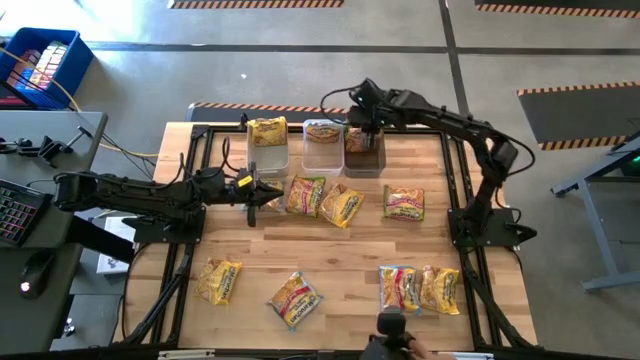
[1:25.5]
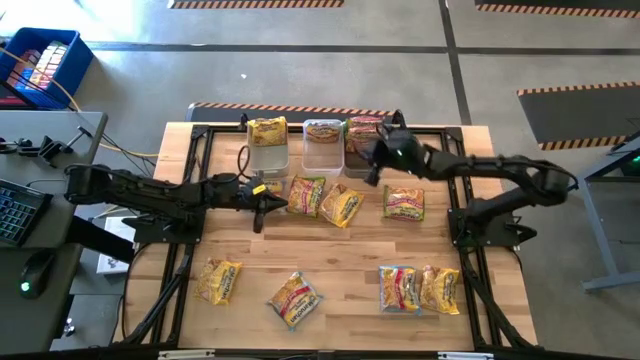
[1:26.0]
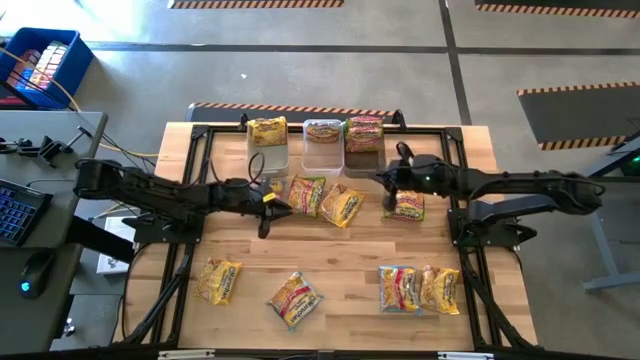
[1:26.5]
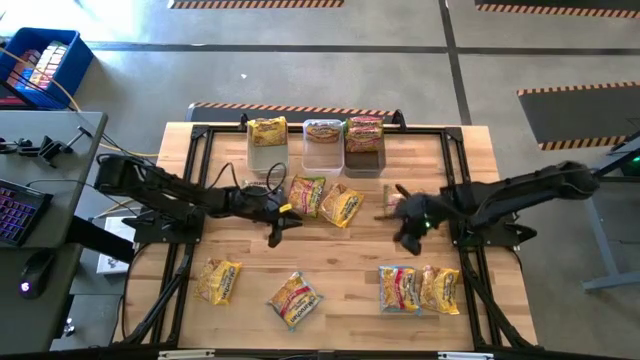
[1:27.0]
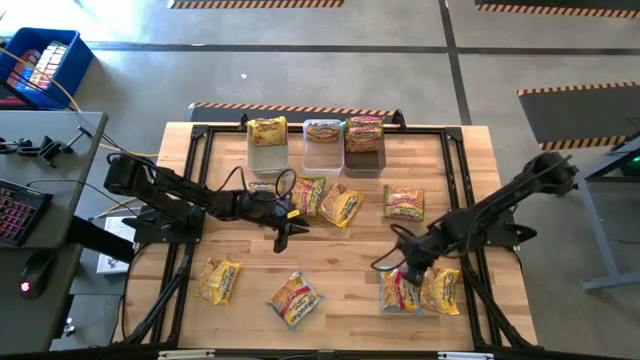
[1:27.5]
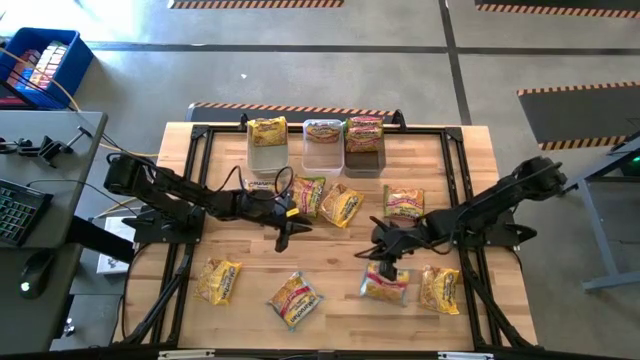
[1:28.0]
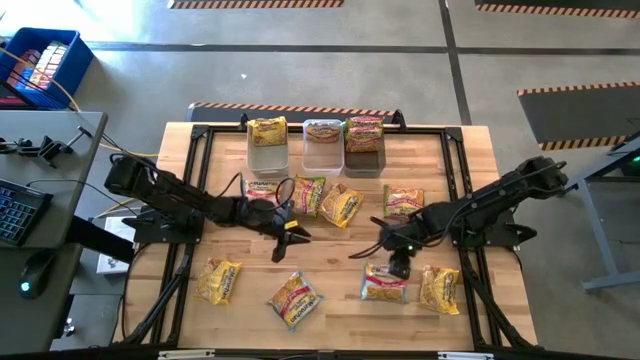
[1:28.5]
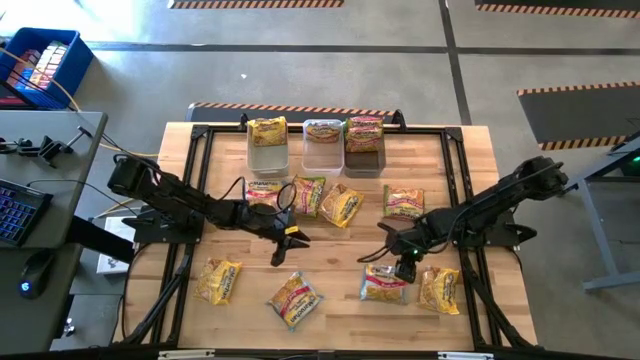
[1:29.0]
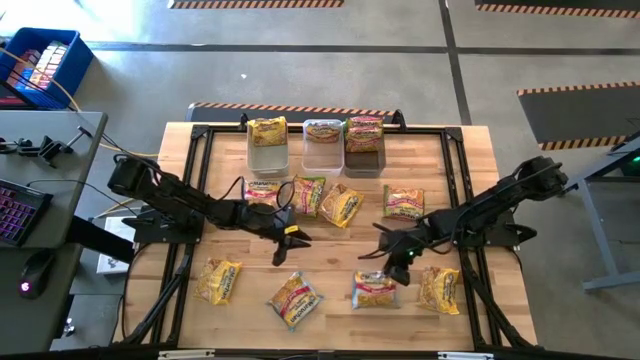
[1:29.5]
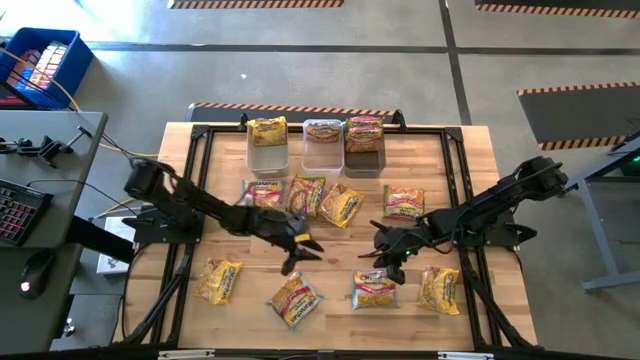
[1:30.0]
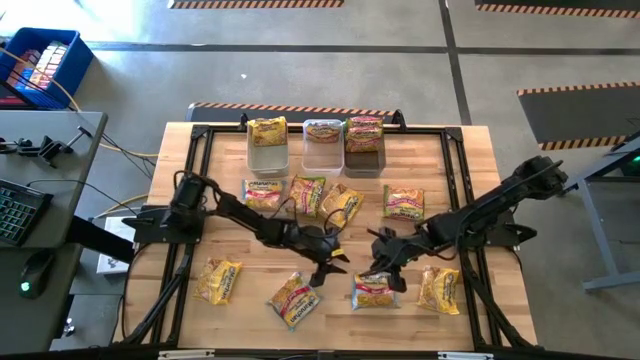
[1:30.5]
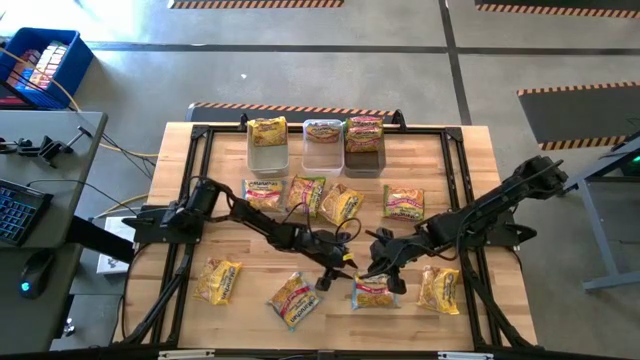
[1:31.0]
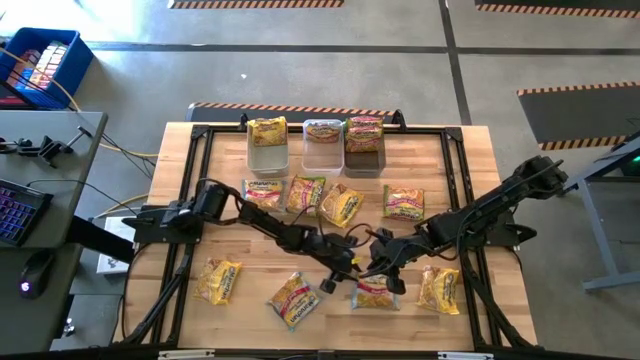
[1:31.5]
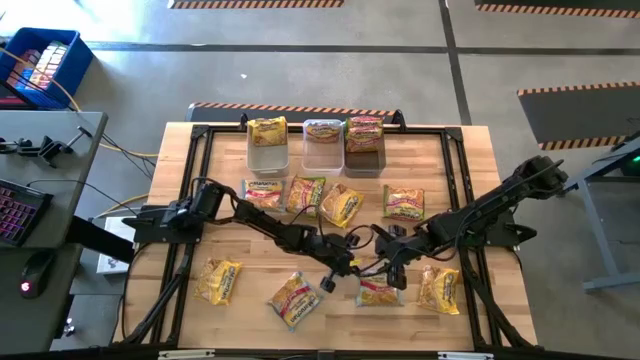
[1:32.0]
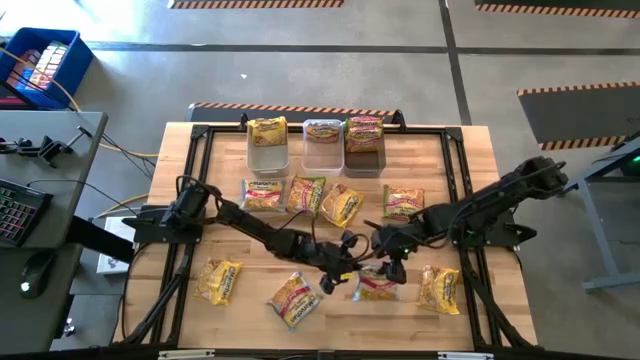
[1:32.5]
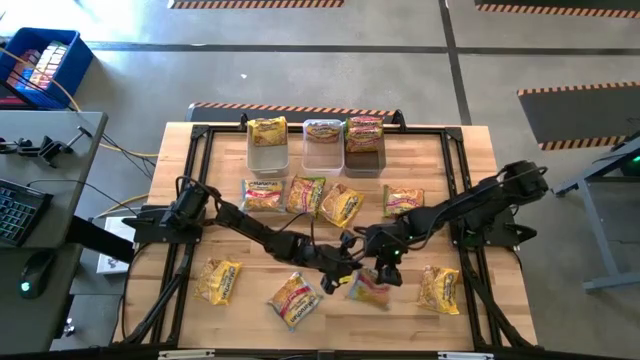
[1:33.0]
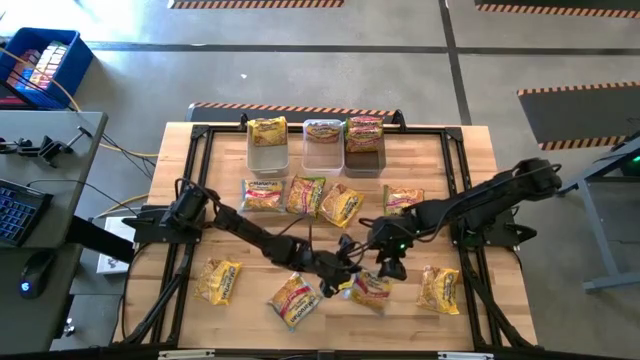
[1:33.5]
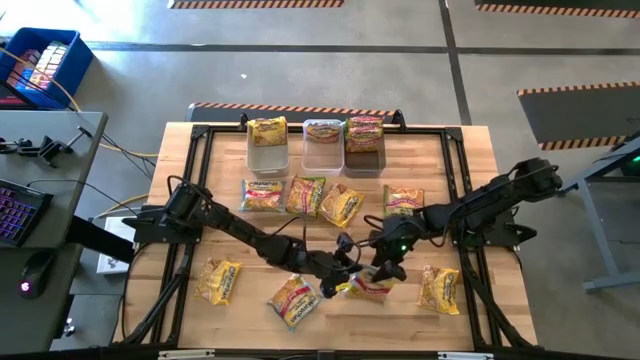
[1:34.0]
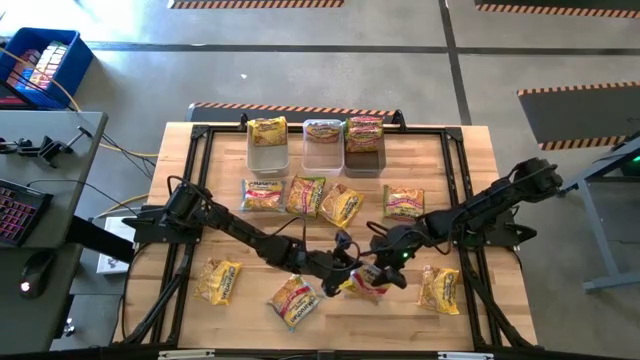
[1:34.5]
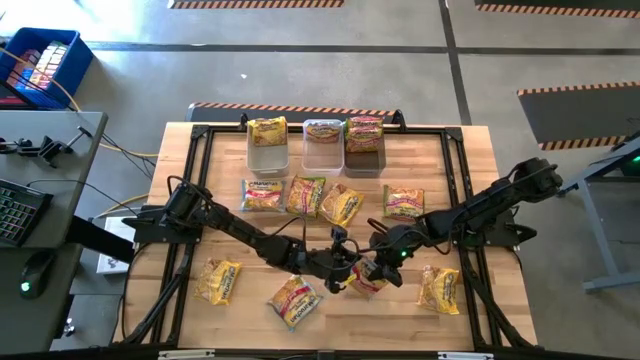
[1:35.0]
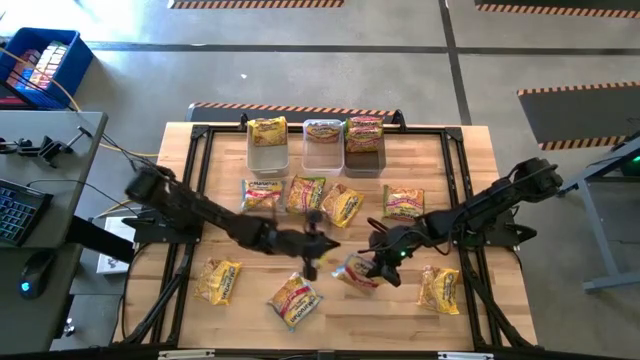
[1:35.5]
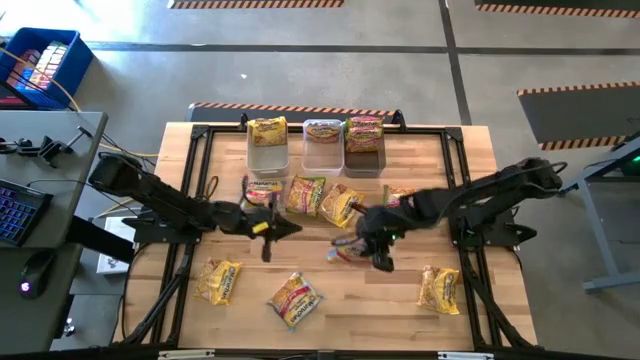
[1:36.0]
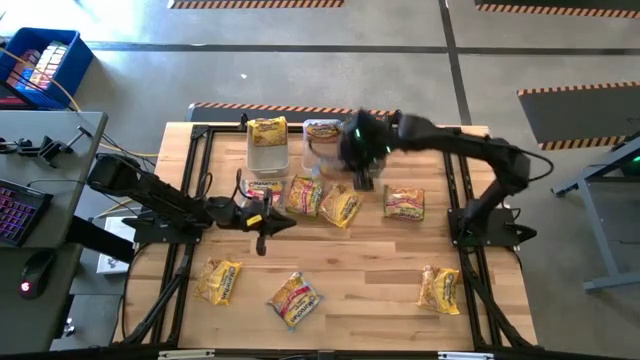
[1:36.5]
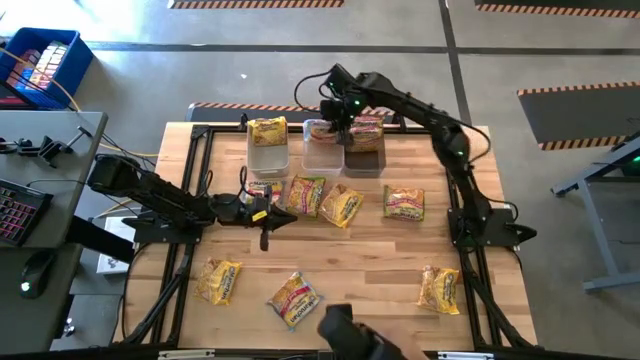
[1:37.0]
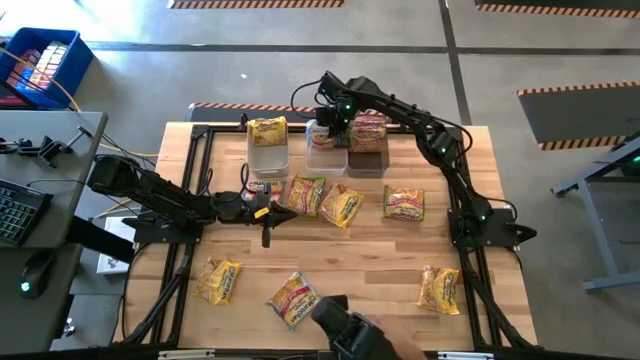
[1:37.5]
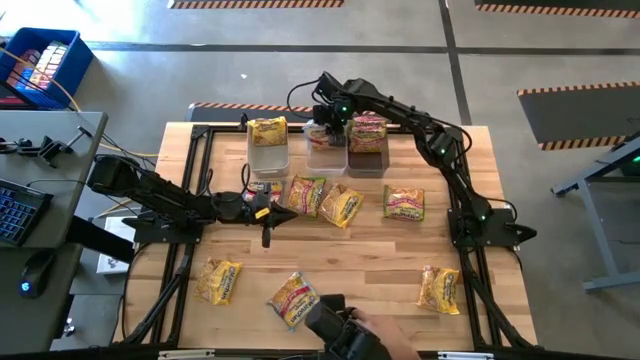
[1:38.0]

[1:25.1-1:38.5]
Task: Sort Maruchan noodles
Put the bottom right blue noodle pack into the transparent white bin

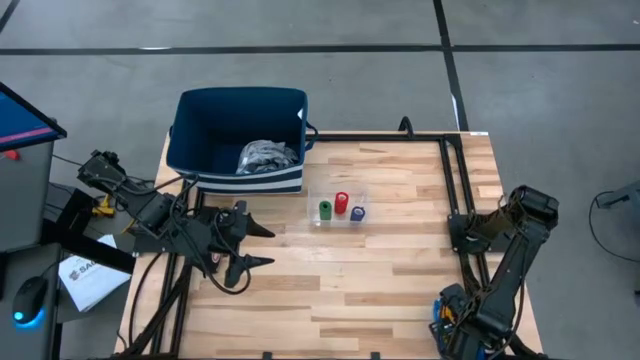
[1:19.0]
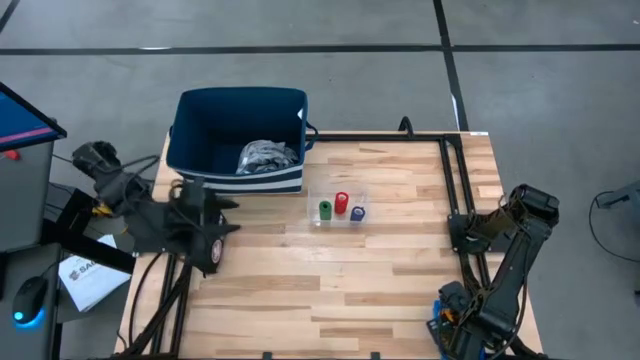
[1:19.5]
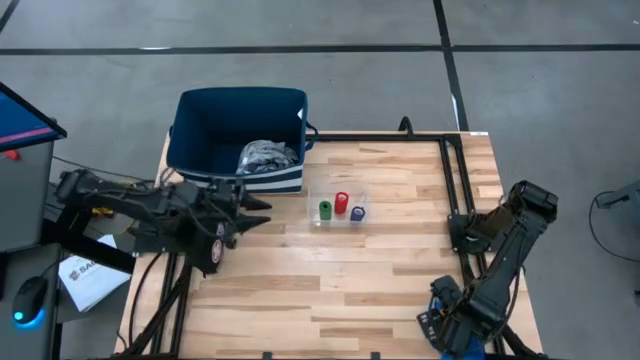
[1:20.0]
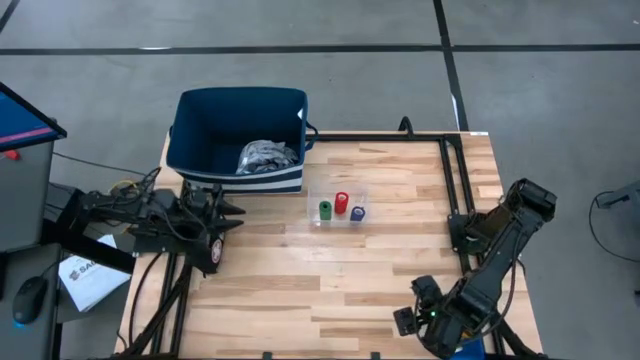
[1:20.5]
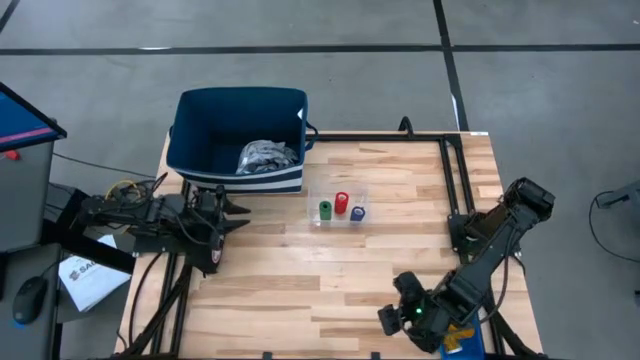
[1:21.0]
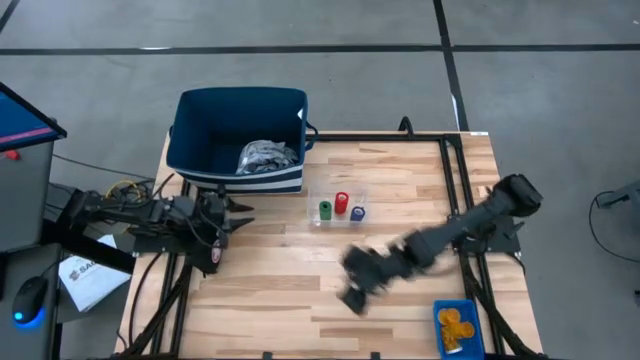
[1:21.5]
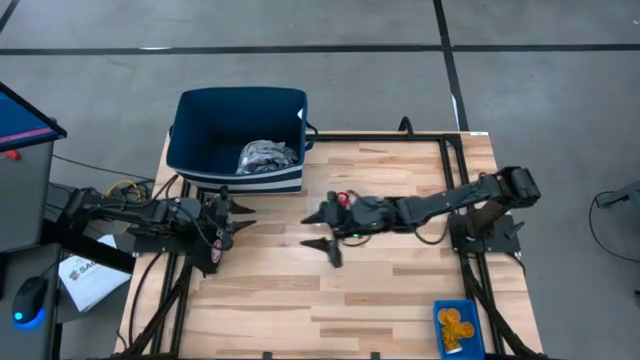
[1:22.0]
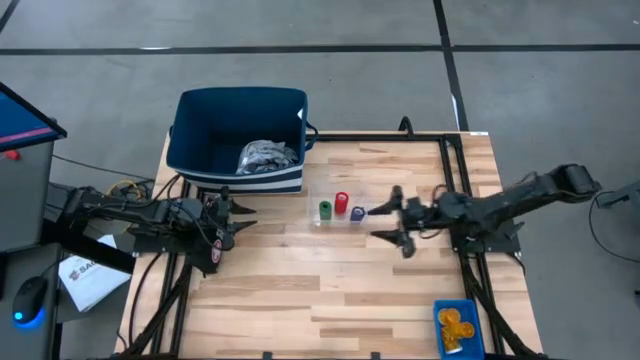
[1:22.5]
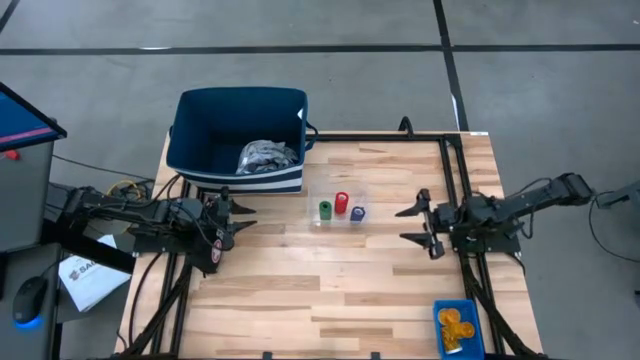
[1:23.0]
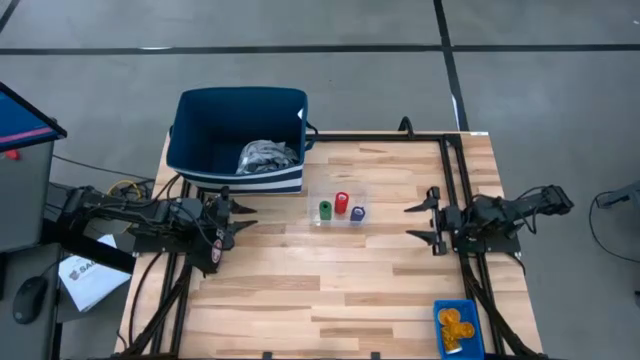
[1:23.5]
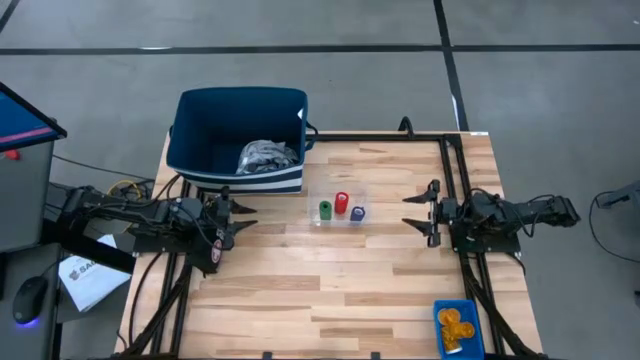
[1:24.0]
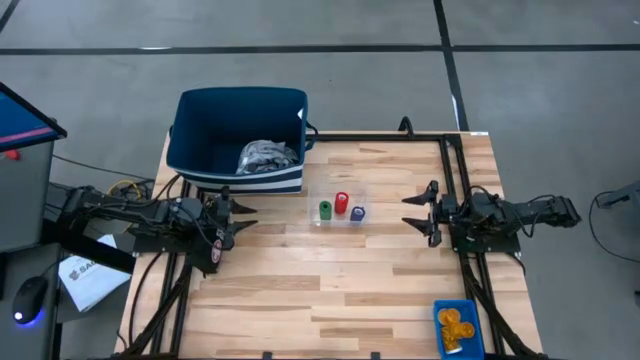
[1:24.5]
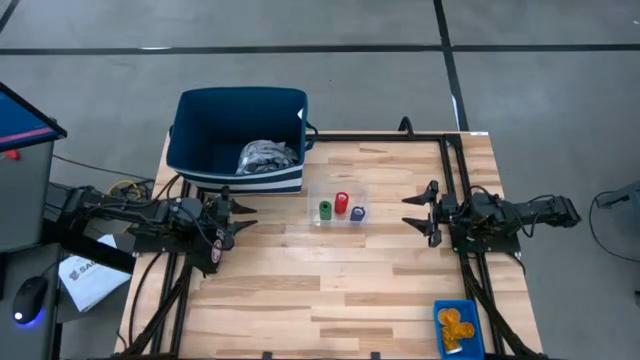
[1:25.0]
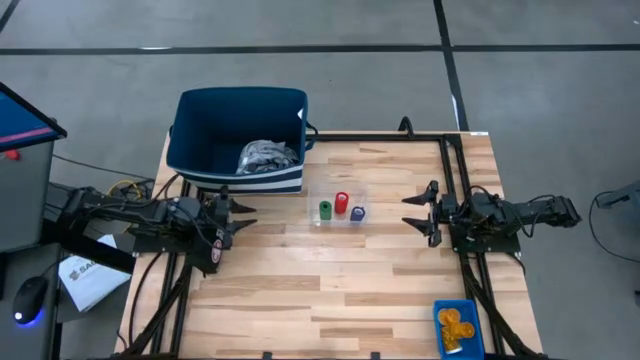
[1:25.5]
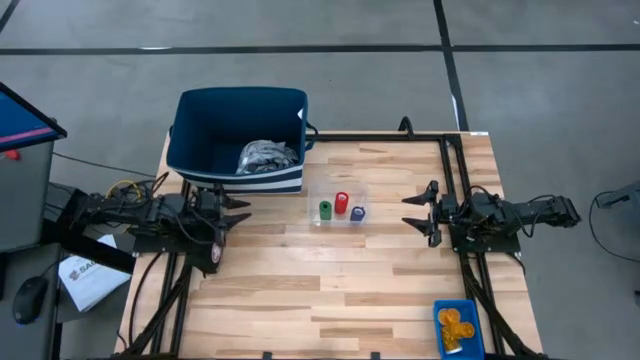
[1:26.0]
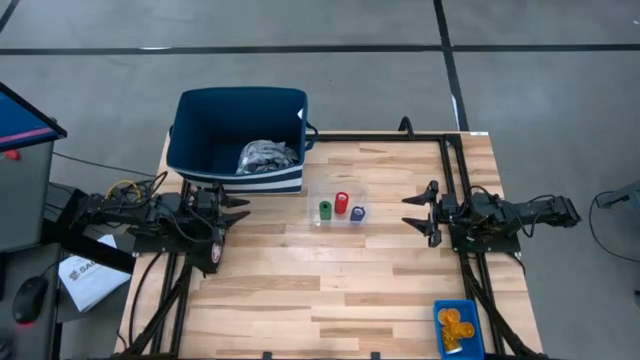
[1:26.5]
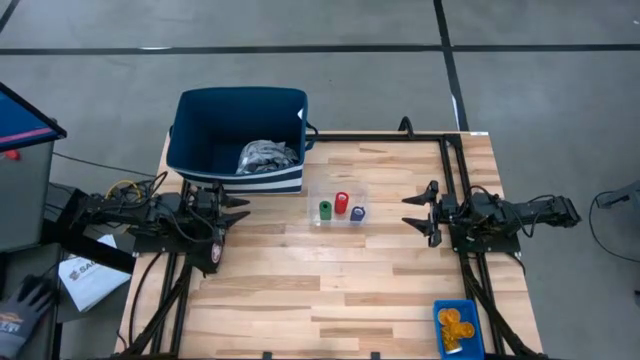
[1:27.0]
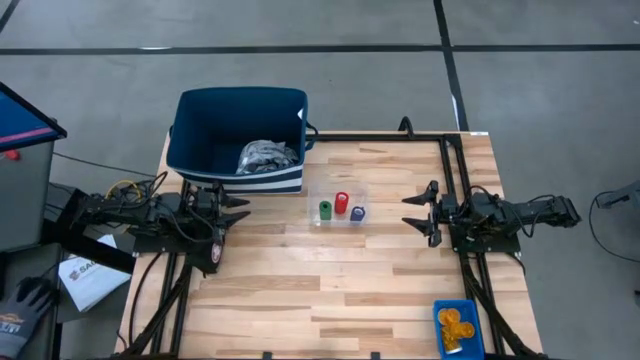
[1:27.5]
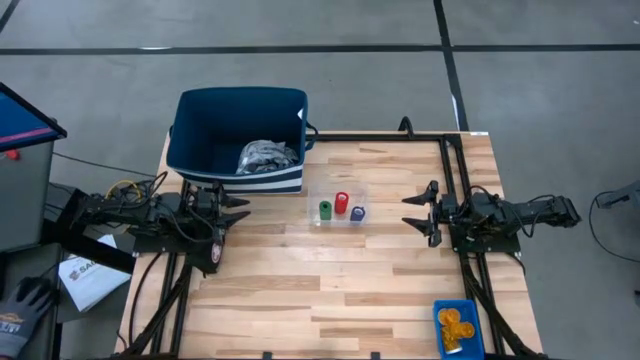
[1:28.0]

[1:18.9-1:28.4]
Task: Pick & place medical supplies in basket/bin
Return to Home Position
